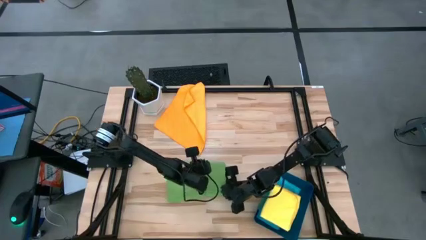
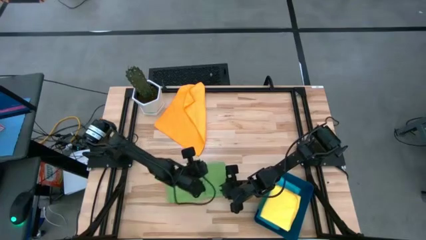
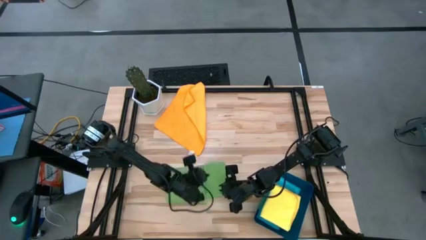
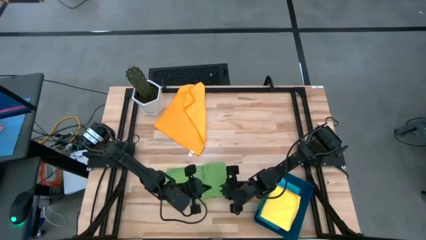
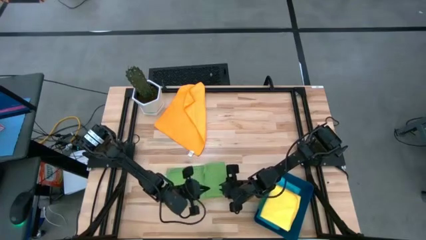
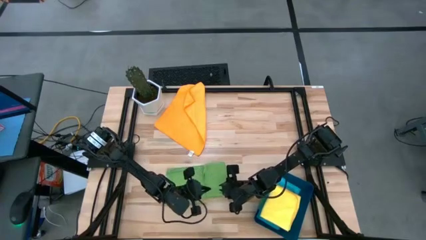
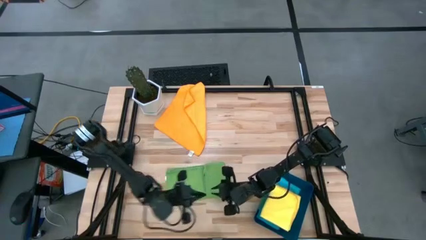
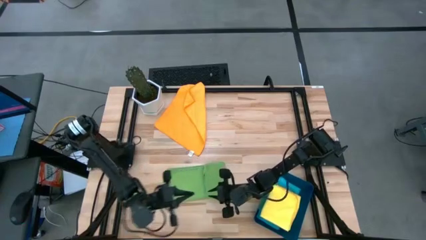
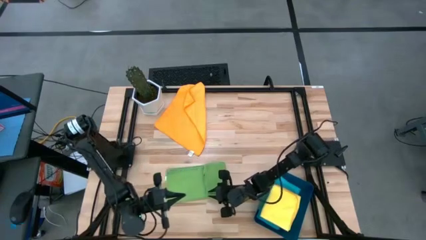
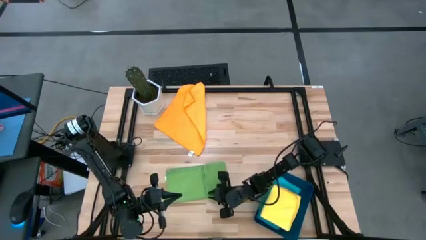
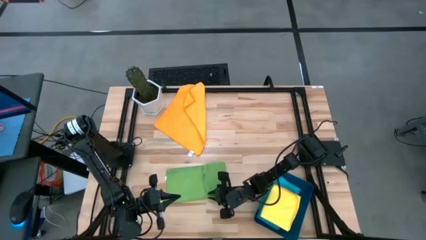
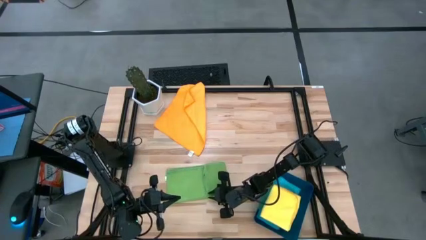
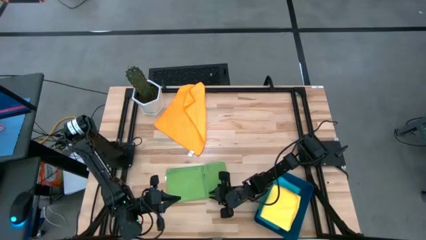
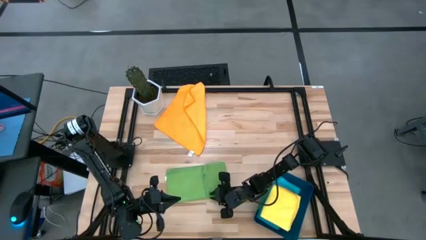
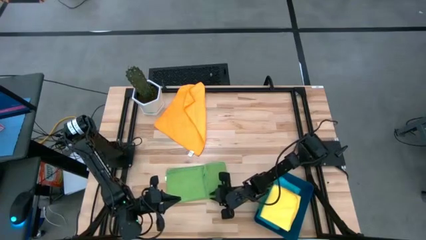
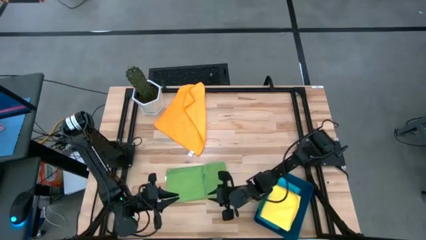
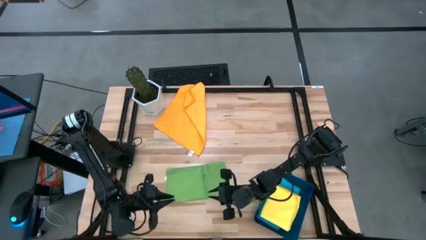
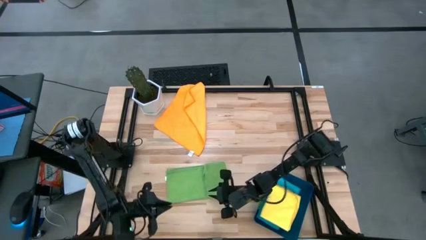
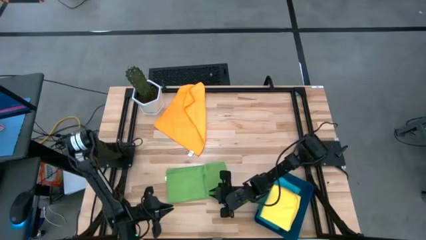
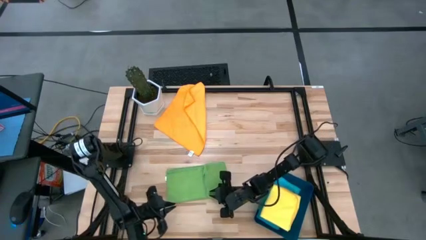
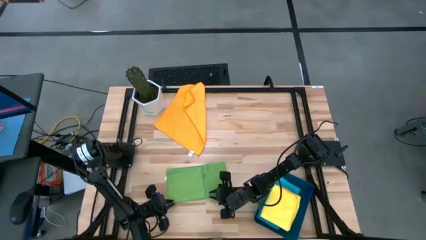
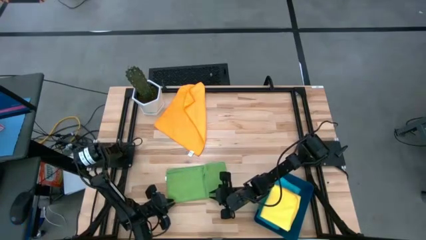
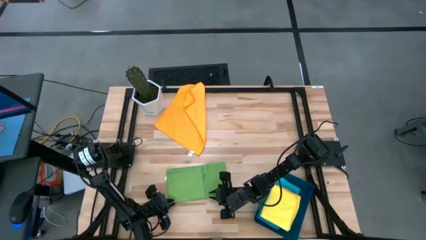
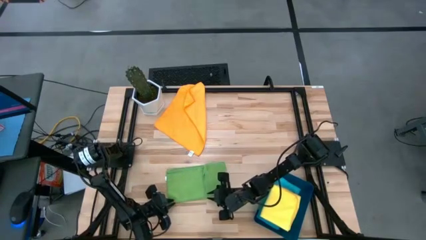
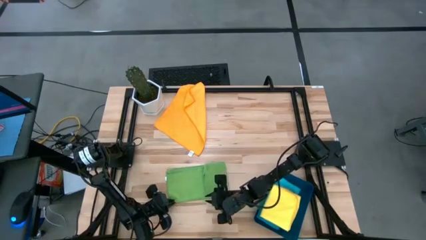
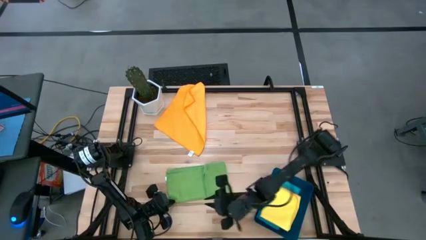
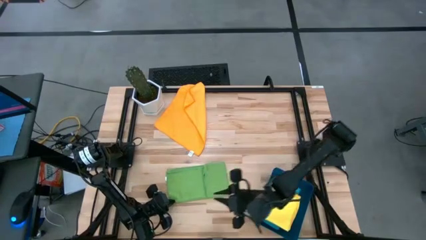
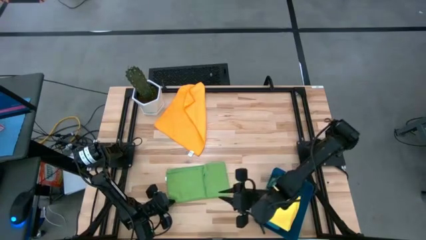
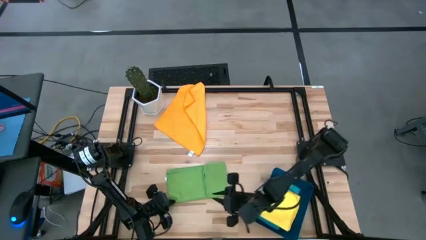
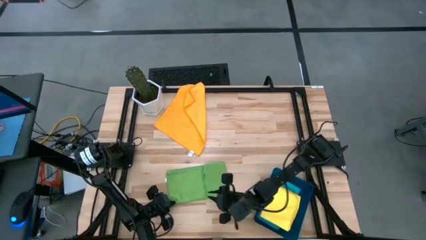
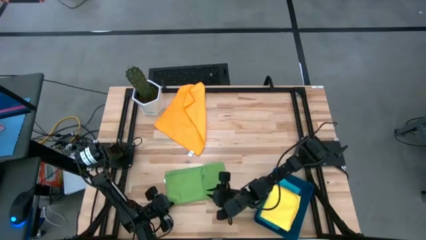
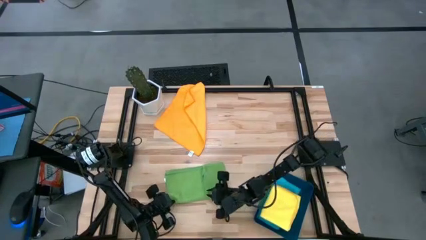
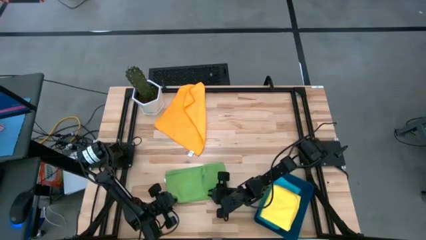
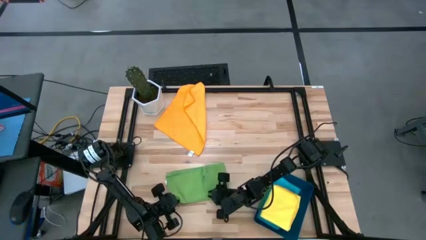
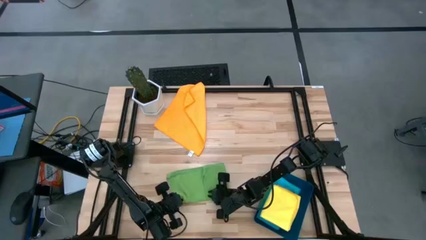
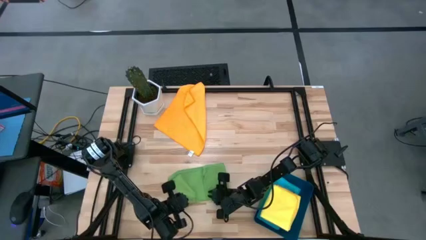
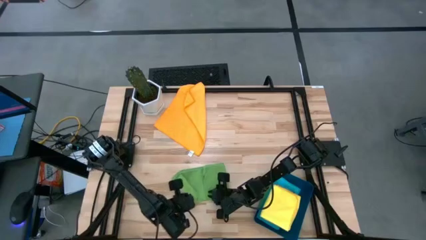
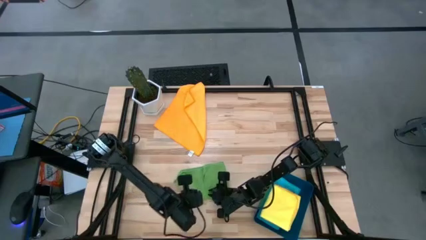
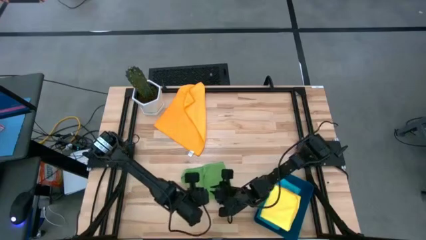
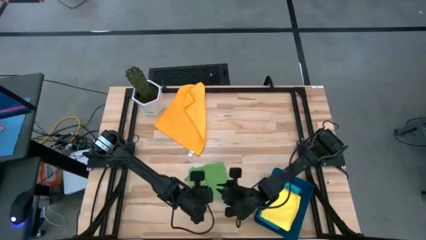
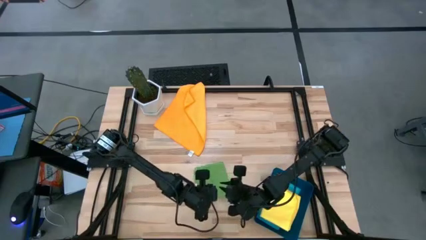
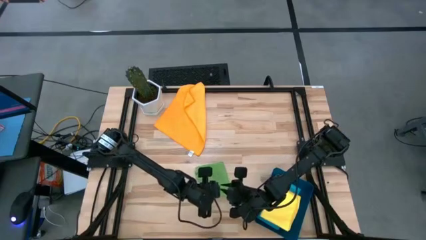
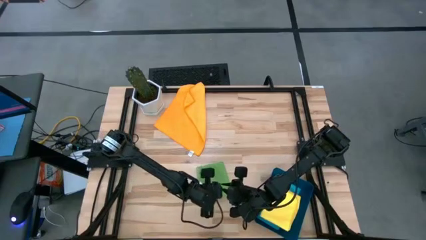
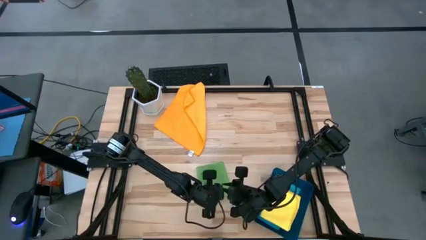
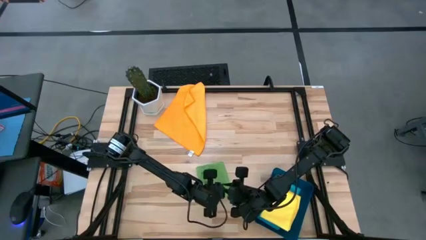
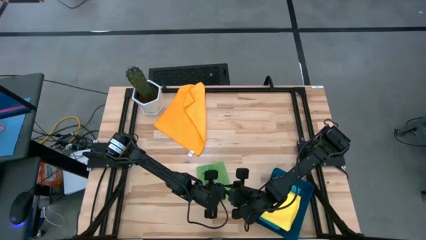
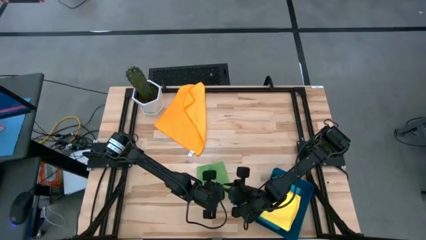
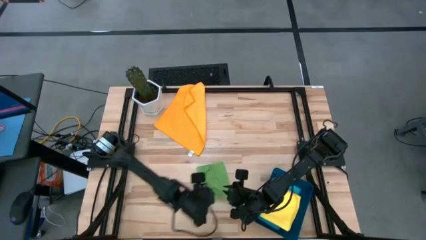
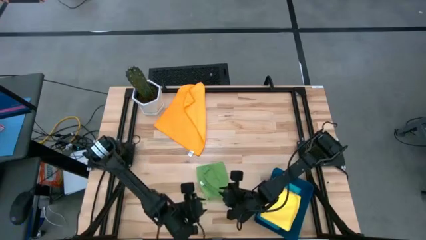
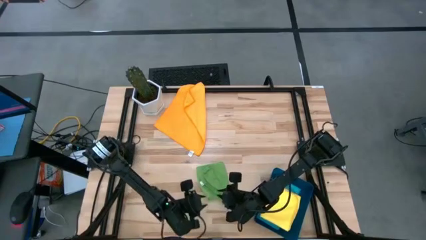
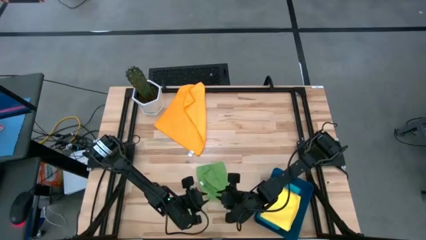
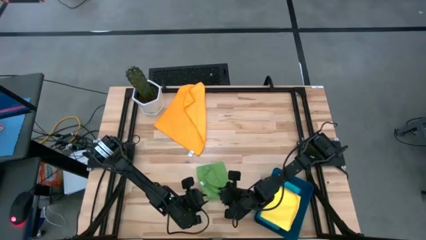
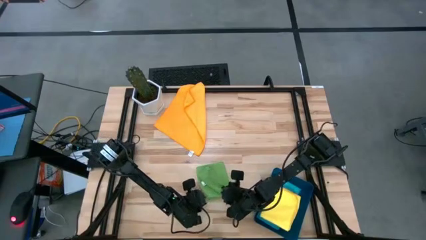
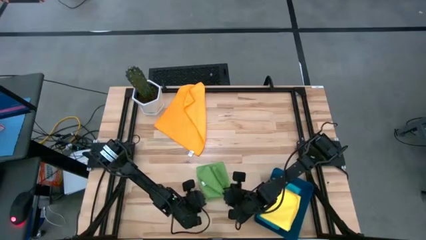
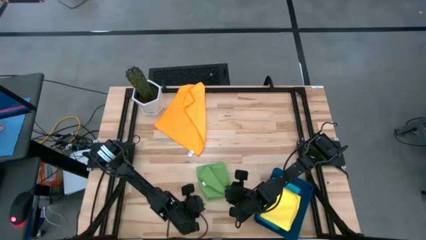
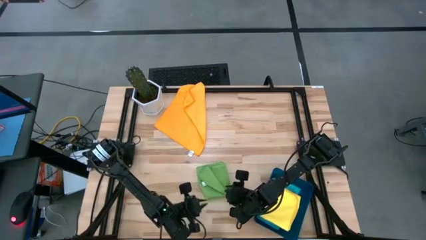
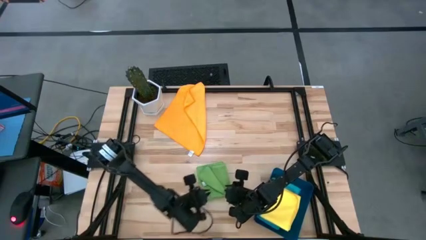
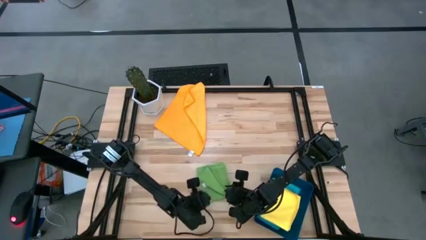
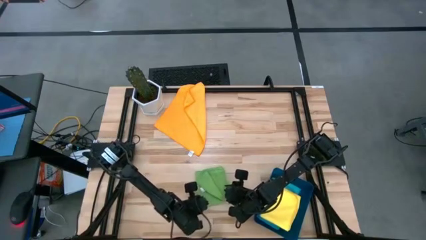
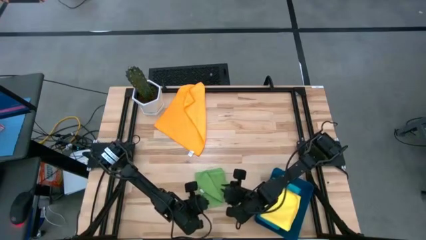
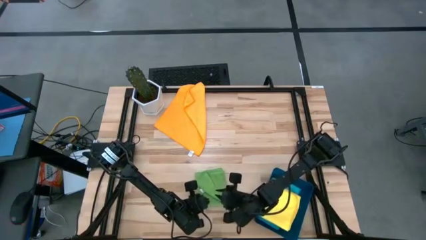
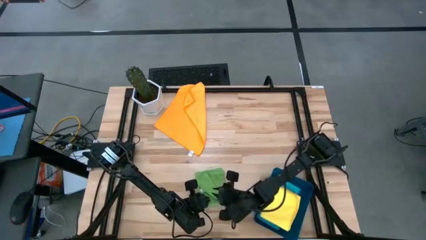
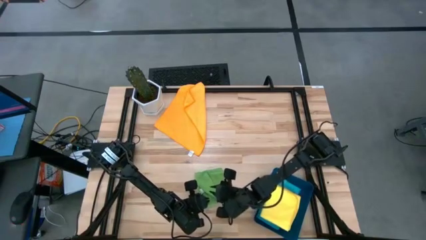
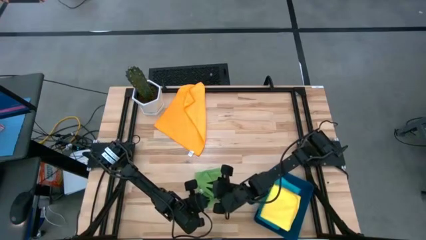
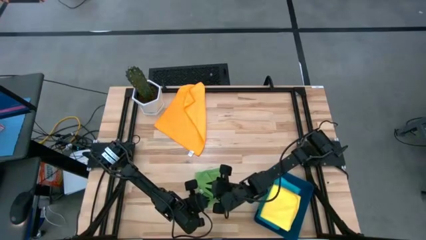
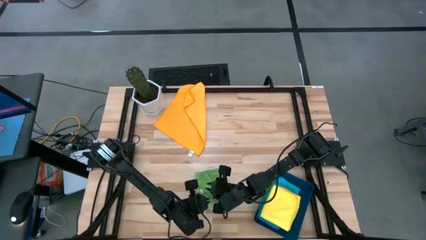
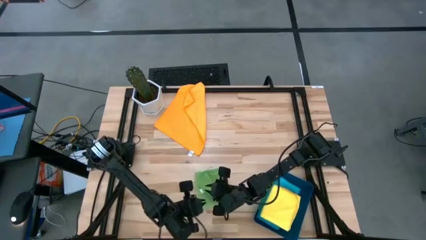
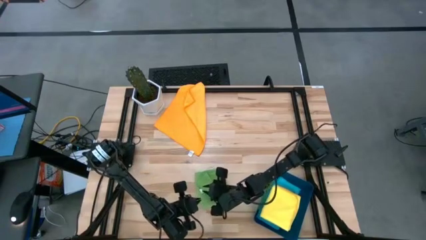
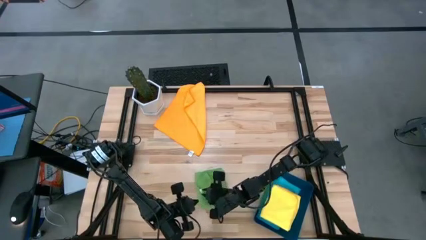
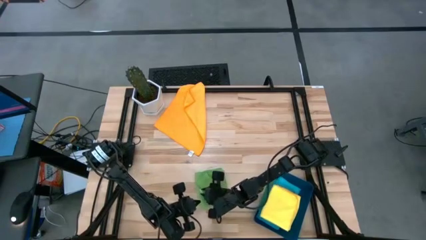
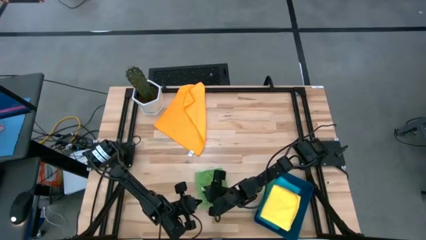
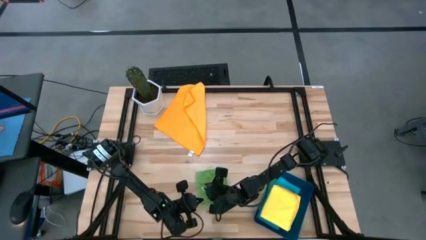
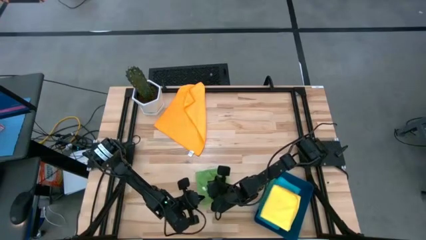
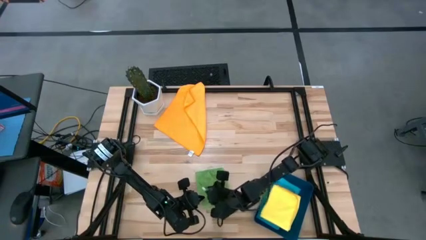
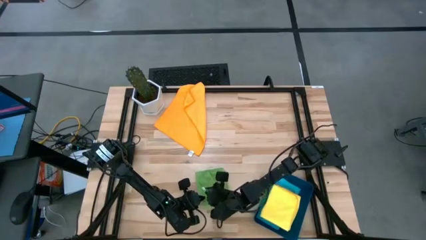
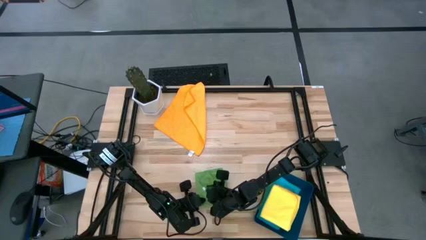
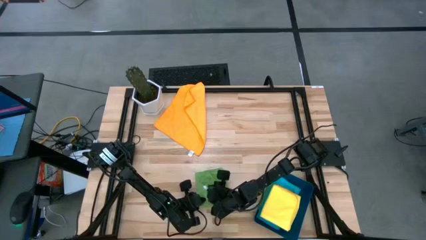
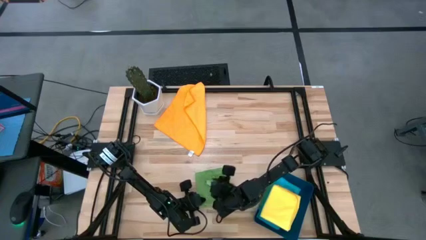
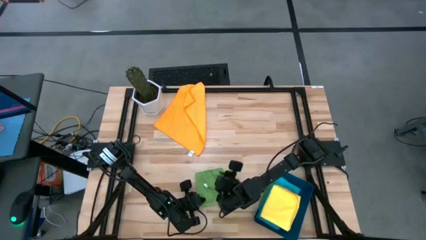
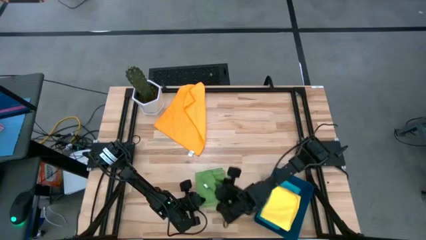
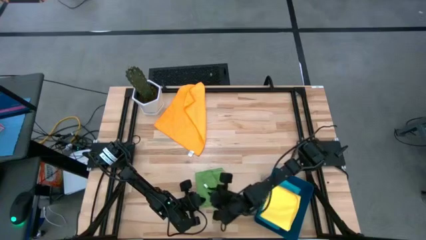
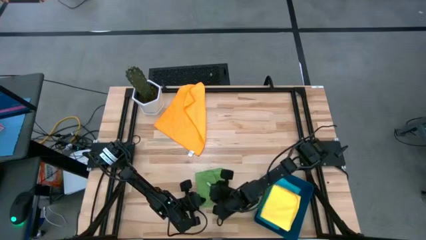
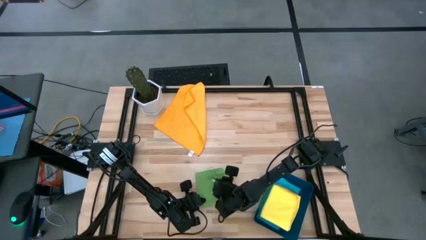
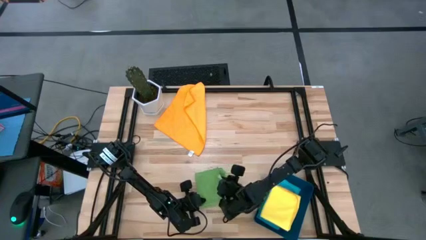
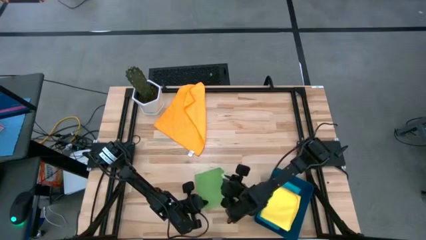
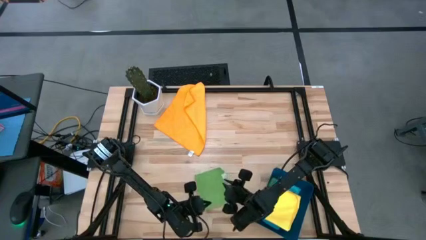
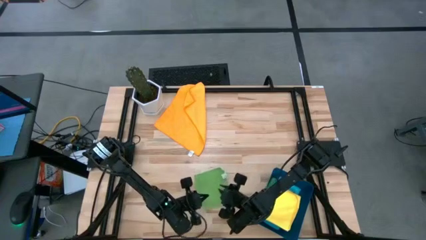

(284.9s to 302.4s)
Task: Fold microfiber towels
Fold the green microfiber towel
